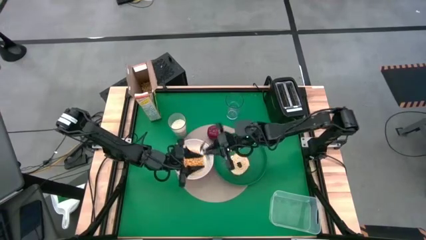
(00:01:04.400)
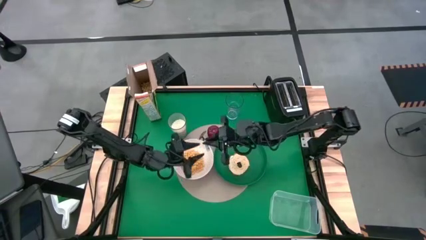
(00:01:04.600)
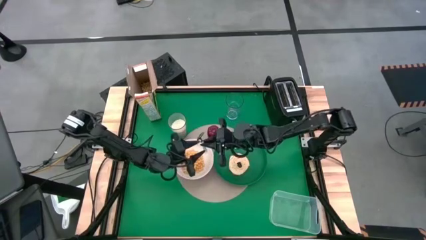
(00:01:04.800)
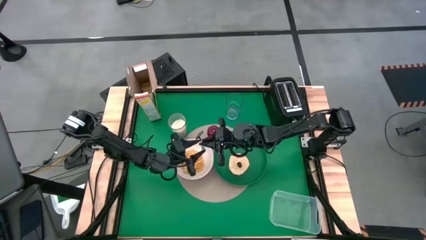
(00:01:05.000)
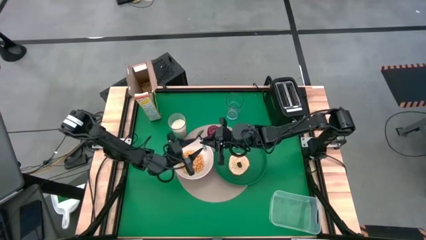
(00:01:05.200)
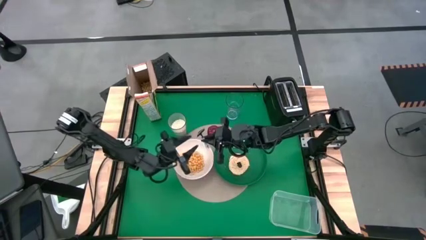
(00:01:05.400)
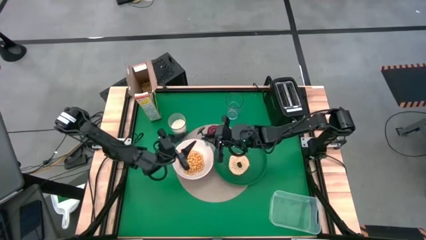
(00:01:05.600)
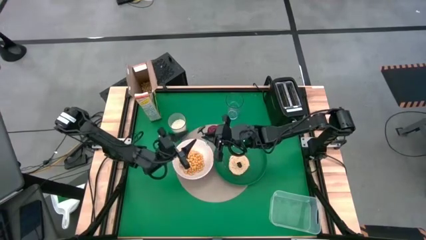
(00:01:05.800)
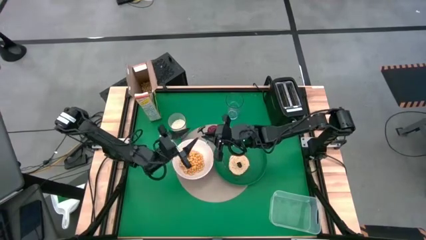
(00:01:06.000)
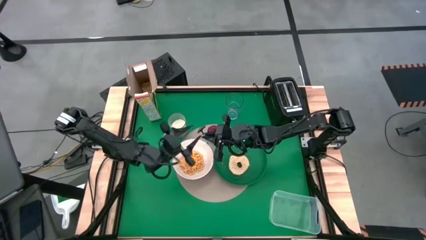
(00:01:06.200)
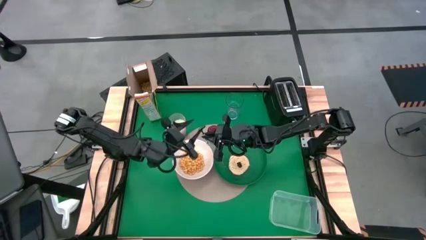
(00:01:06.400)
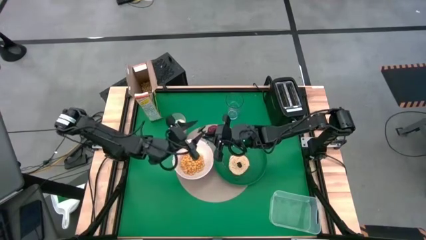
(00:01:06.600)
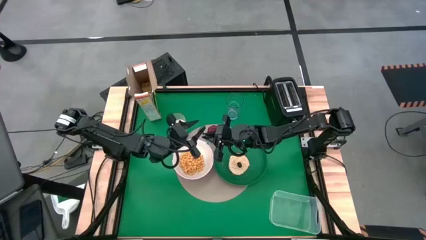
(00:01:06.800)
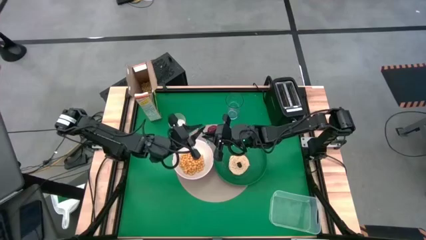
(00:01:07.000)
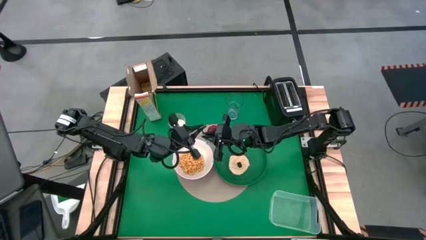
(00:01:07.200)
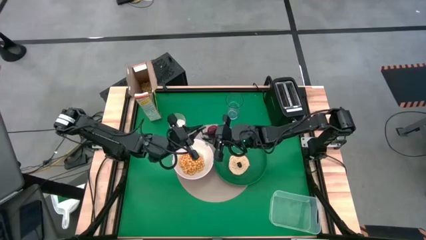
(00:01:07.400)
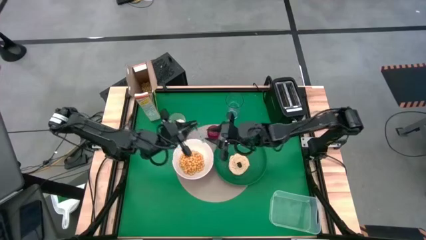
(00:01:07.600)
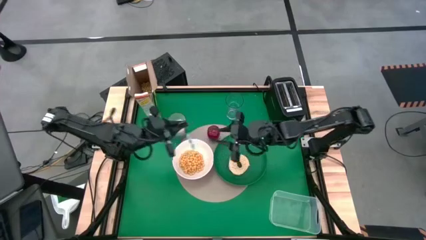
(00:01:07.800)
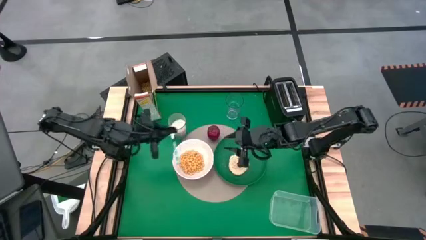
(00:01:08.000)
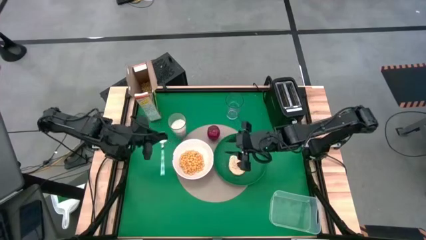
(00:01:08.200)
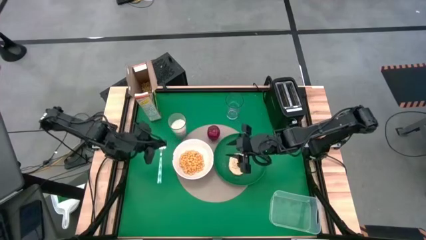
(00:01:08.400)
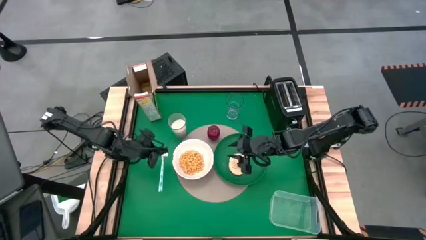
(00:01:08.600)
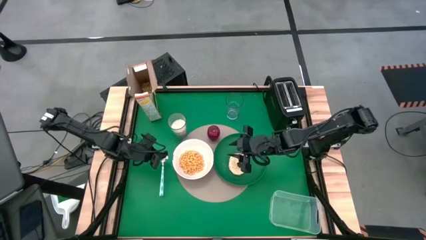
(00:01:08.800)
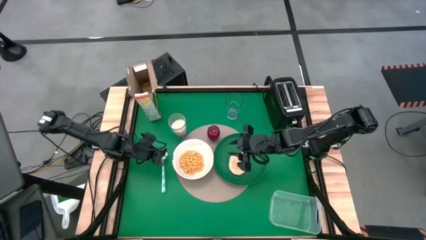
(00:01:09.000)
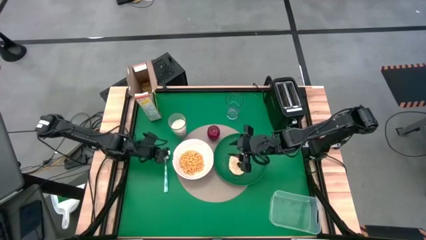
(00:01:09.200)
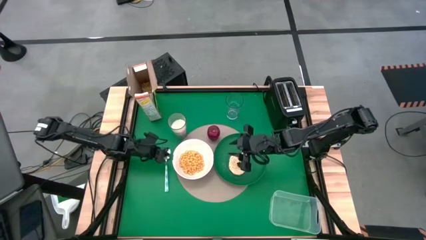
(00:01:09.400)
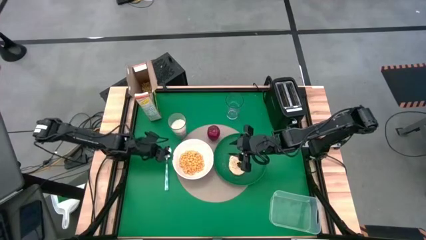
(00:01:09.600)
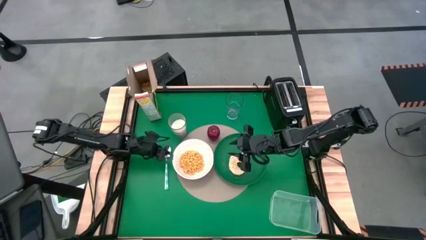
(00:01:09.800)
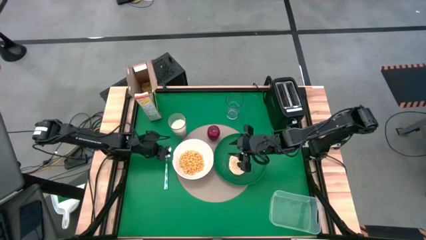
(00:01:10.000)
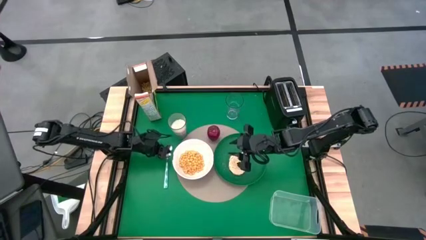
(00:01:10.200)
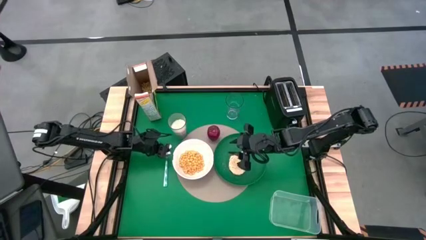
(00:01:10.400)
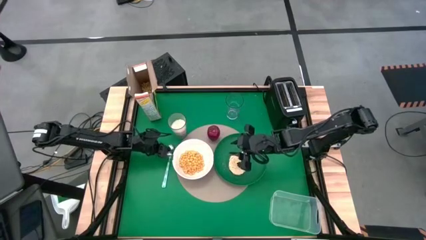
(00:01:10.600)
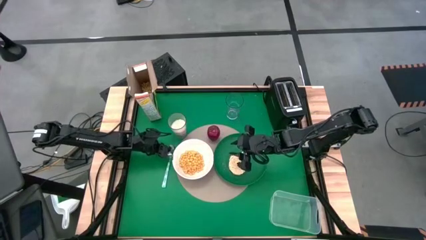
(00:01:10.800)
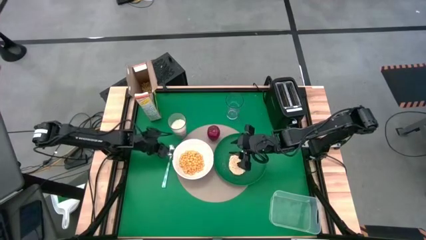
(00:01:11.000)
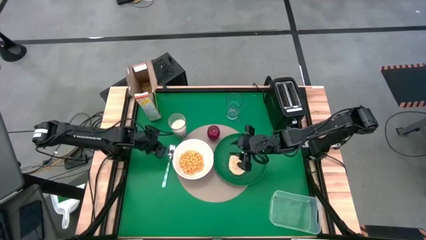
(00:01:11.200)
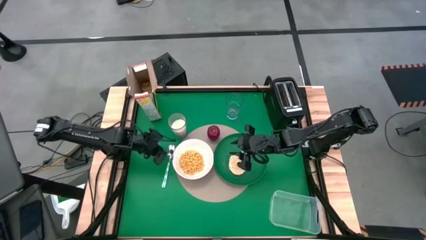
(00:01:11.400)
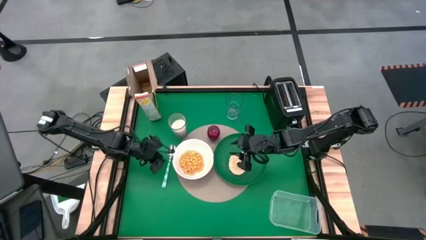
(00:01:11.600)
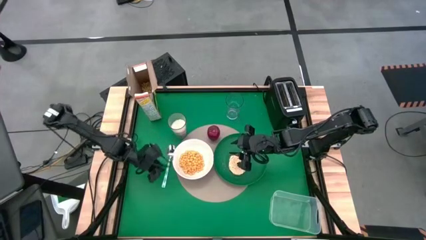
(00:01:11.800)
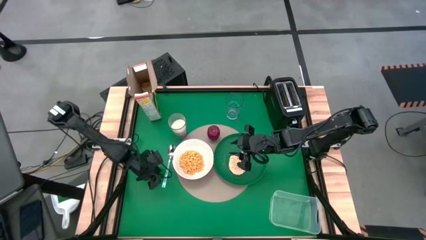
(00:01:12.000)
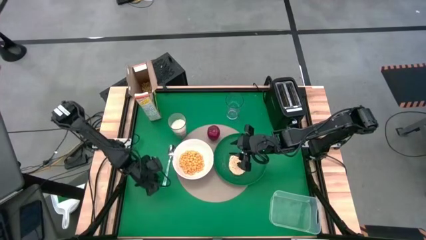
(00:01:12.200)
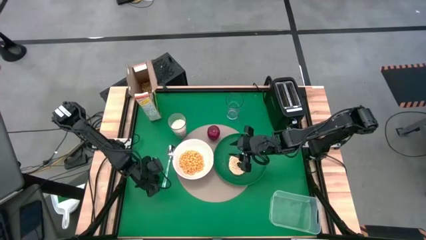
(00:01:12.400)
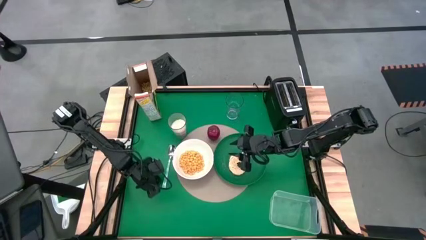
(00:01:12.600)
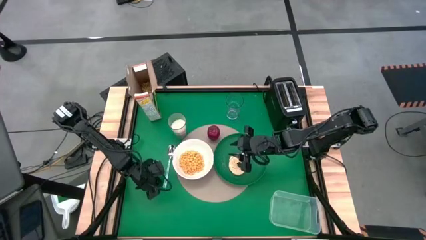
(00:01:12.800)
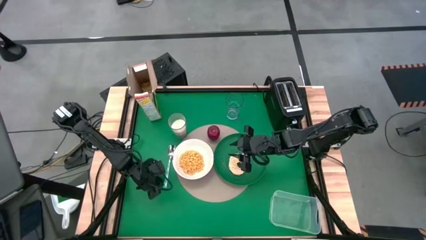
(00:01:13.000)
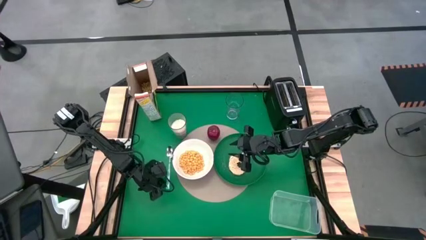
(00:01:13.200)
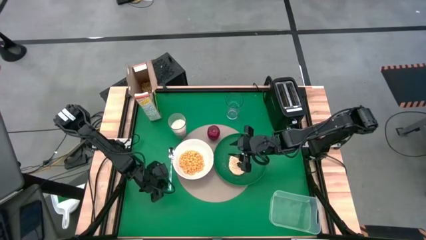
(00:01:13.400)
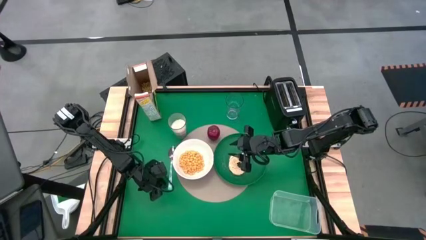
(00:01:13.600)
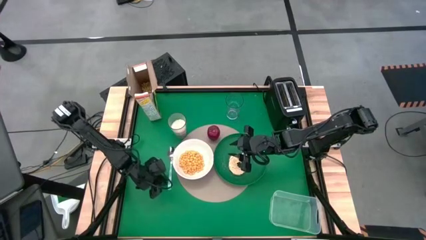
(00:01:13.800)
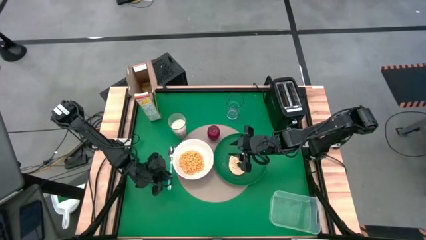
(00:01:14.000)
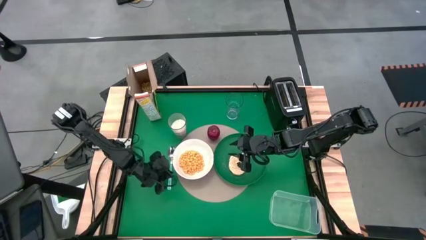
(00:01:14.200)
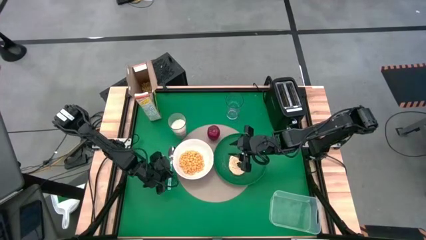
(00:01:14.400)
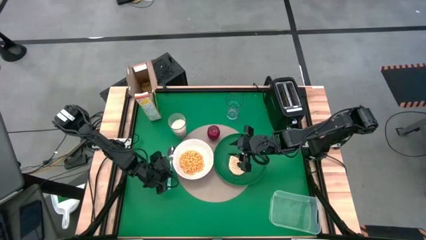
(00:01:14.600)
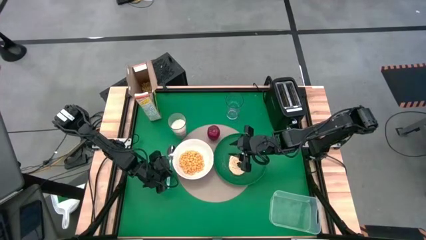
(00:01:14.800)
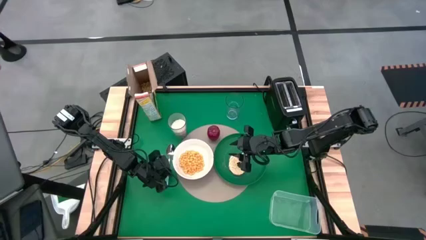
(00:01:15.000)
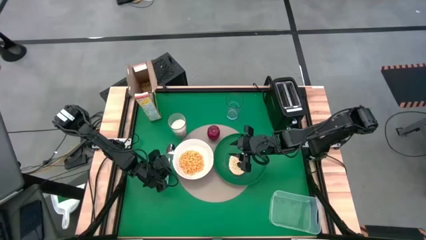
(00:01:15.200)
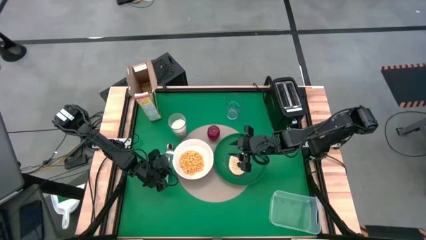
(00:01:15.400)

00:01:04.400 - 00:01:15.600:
Task: Arrange a breakfast setting
Put the spoon to the left side of the white bowl

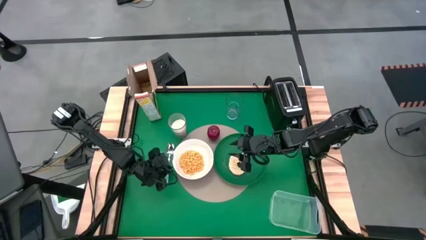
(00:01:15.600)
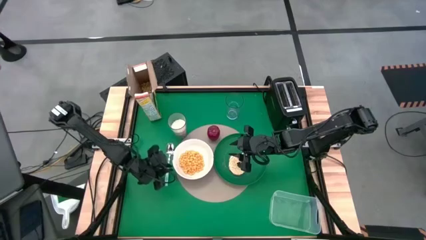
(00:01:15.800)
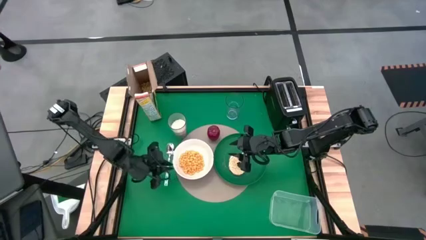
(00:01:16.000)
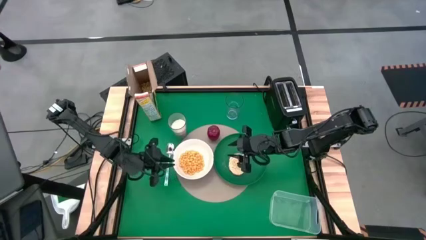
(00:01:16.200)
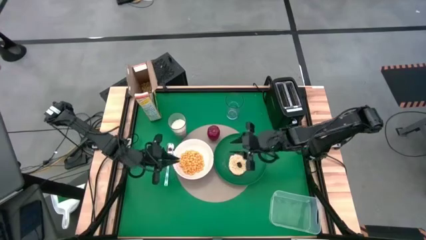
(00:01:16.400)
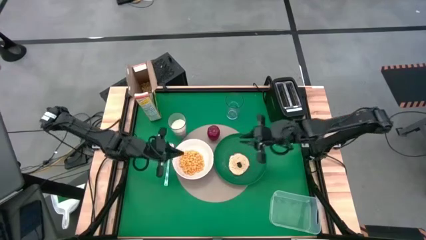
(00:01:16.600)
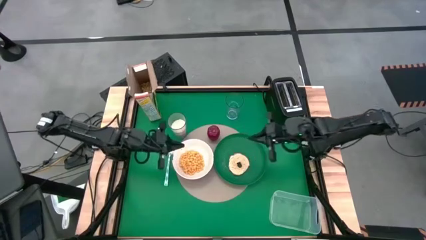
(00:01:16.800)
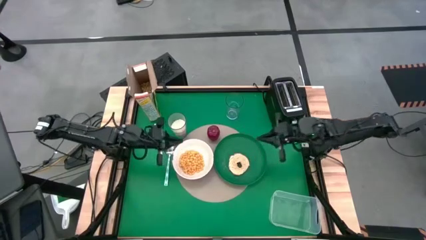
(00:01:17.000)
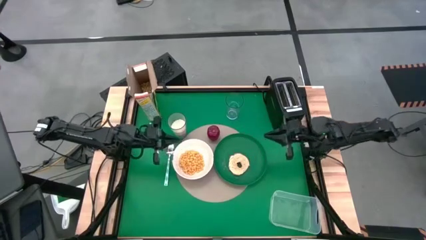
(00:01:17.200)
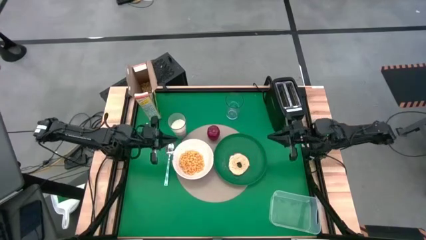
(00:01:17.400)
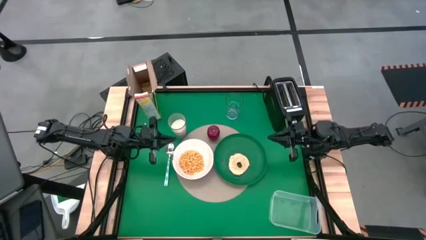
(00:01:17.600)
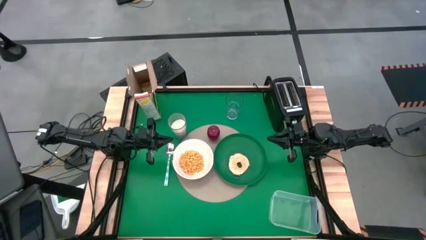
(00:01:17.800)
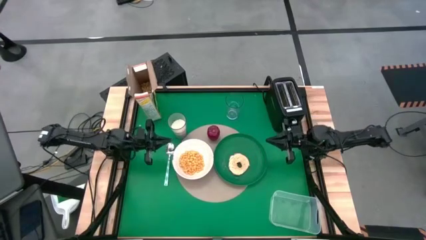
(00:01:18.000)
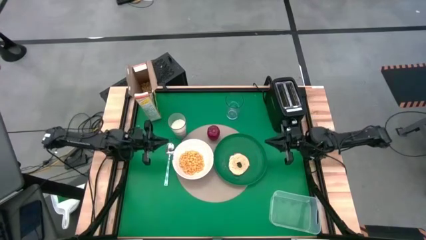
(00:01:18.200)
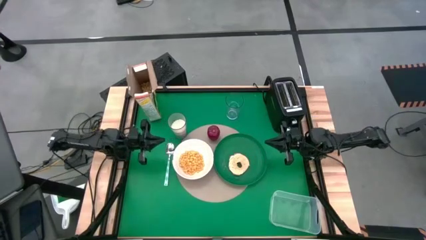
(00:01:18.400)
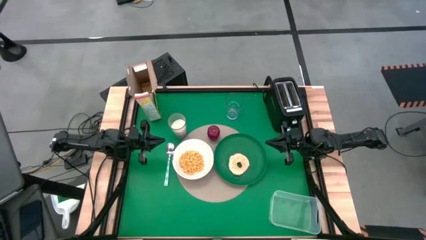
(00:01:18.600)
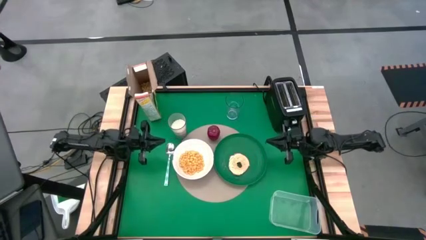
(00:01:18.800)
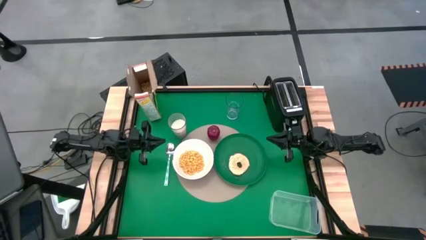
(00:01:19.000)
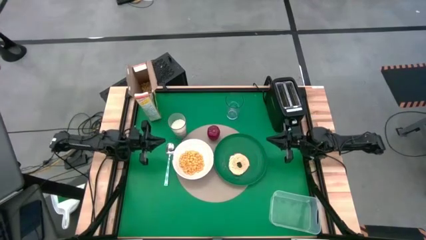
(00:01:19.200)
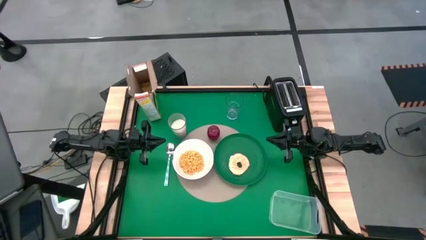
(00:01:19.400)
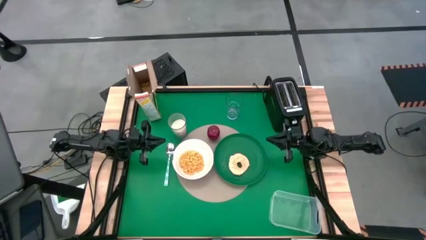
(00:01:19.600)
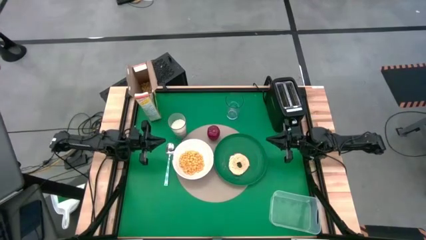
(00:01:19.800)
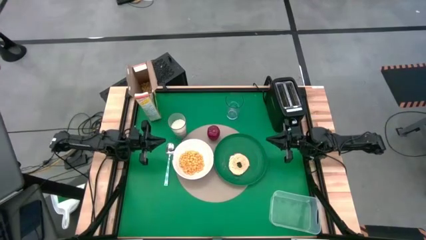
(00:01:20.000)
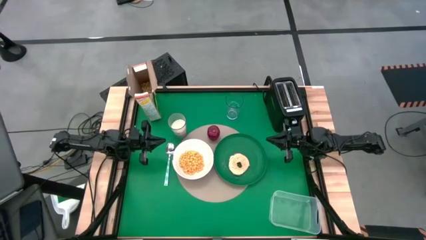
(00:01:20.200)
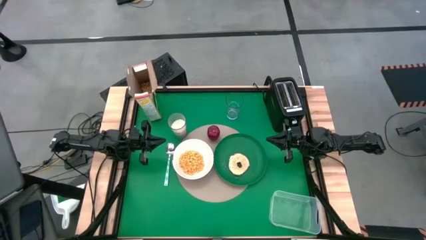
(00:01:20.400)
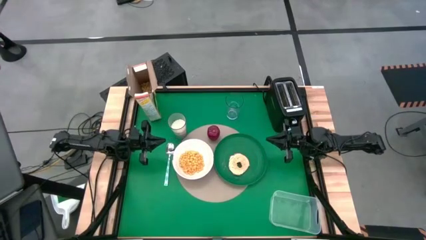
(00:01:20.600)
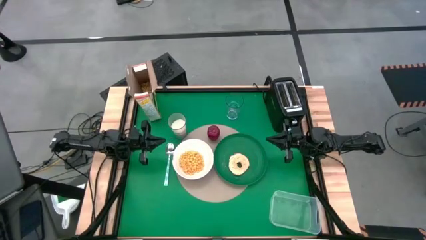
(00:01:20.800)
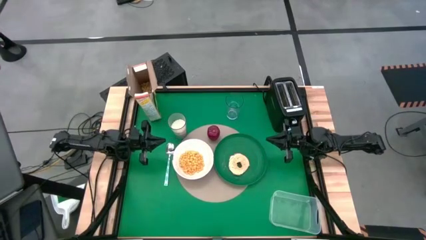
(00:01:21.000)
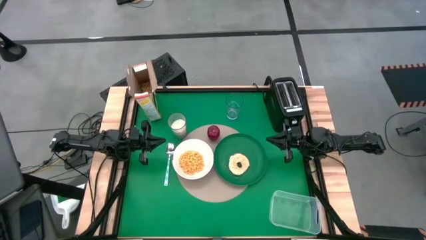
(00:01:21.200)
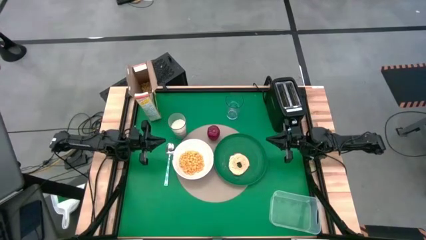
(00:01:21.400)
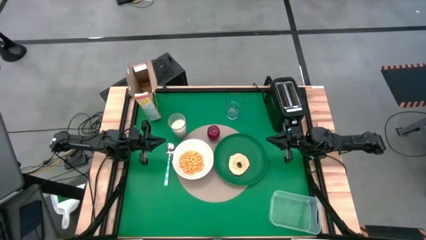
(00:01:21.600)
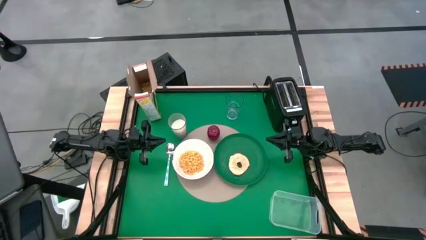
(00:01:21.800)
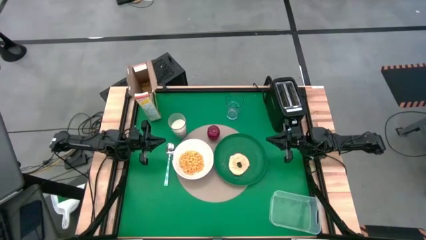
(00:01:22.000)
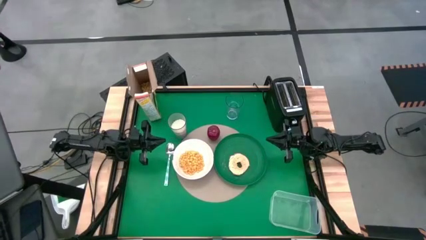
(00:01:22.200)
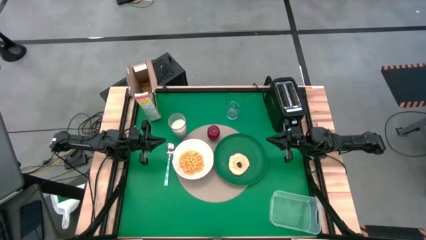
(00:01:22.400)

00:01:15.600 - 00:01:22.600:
Return to Home Position
